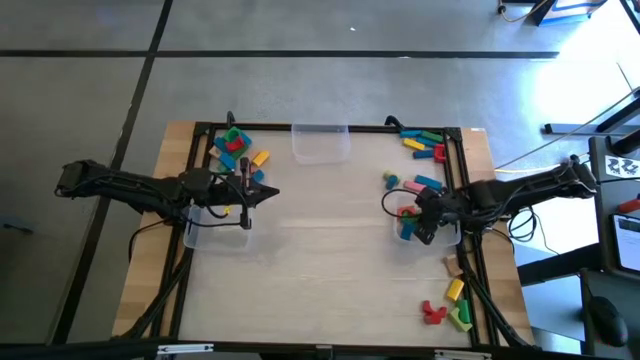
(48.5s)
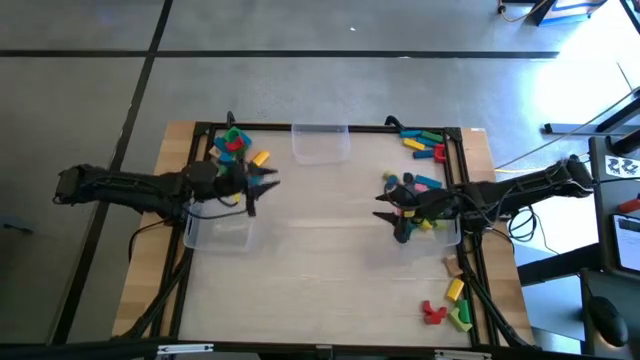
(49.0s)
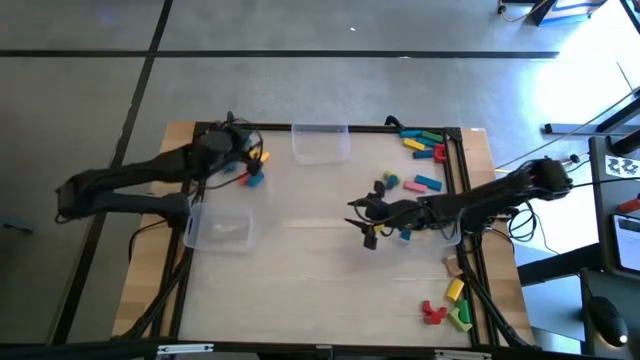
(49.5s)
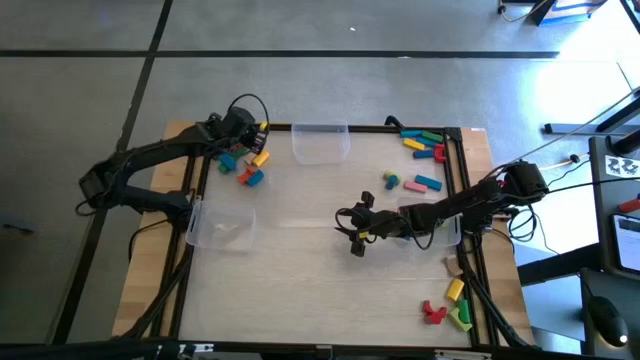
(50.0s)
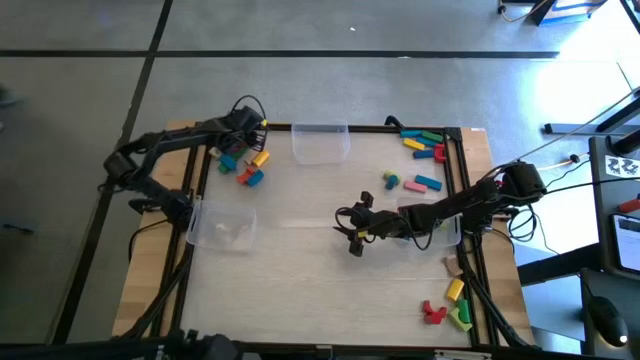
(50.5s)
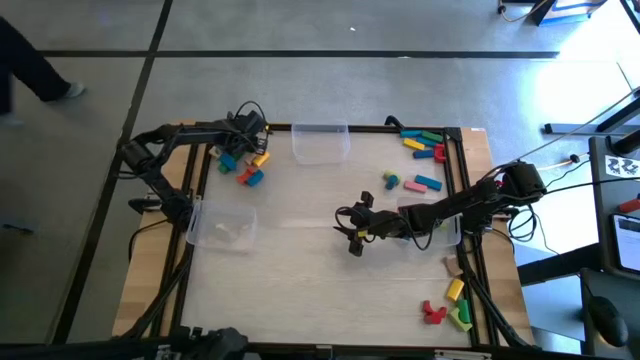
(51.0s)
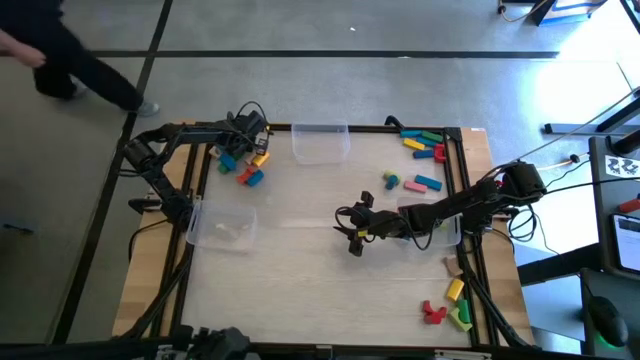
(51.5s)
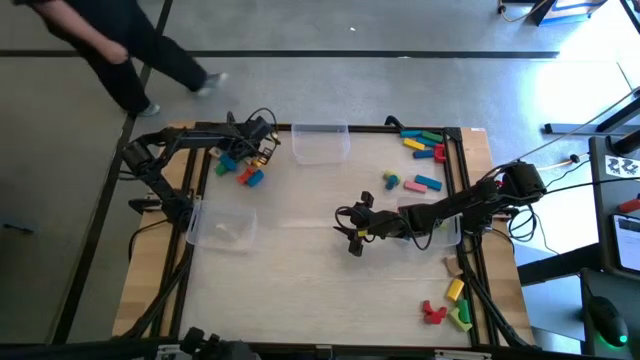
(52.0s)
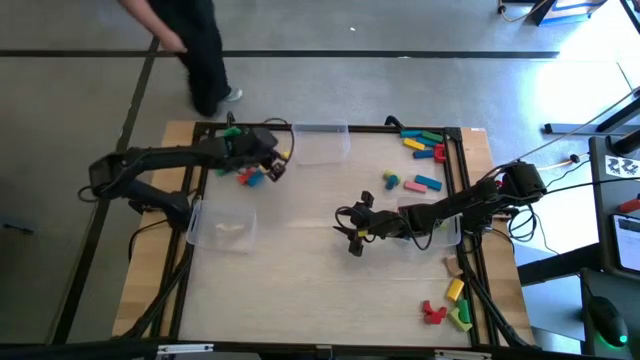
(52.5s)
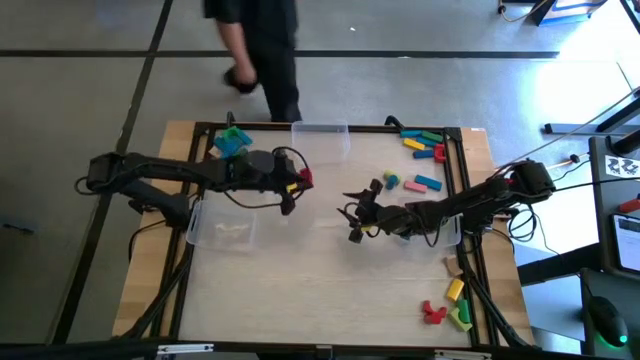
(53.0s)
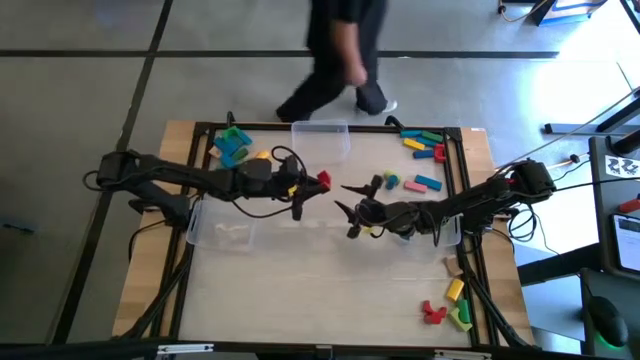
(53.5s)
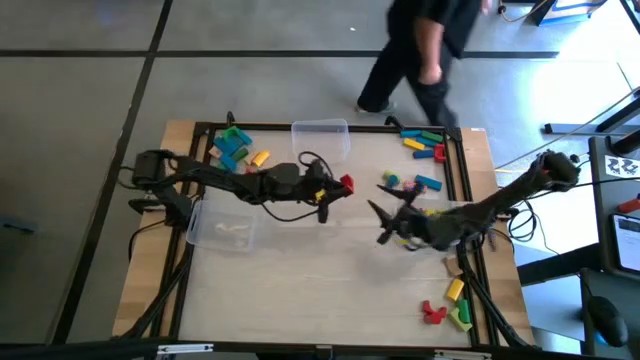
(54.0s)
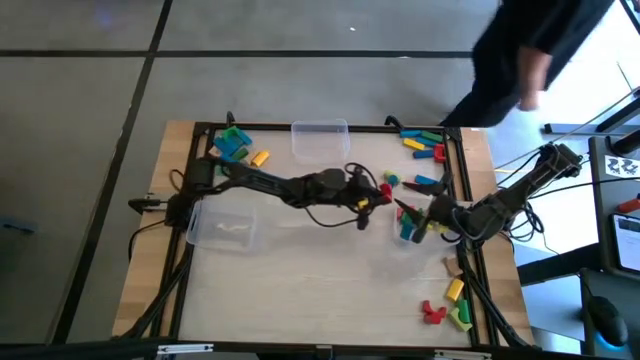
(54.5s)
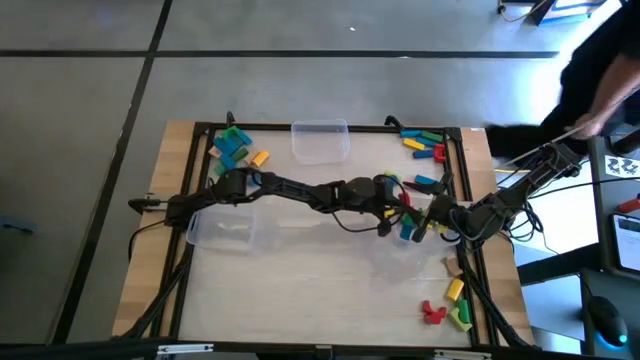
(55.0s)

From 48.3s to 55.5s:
Task: Sort blocks by size
Put the red arch block into the bottom right transparent bin

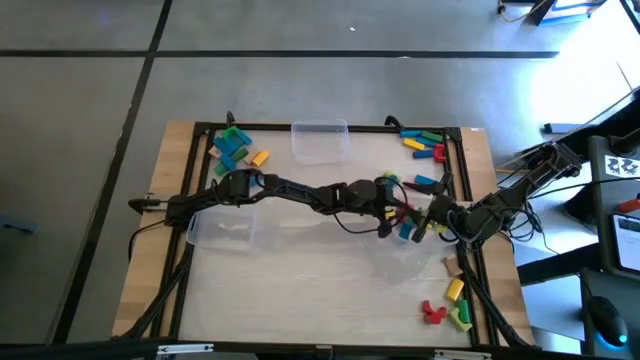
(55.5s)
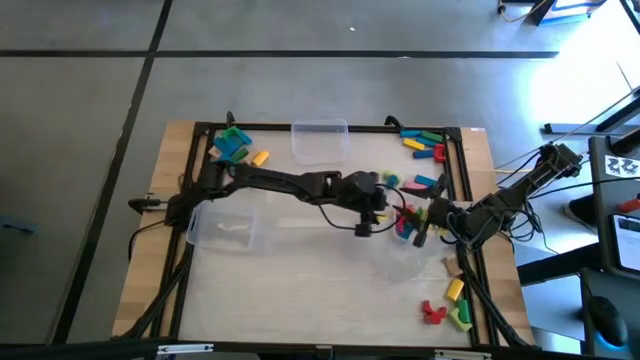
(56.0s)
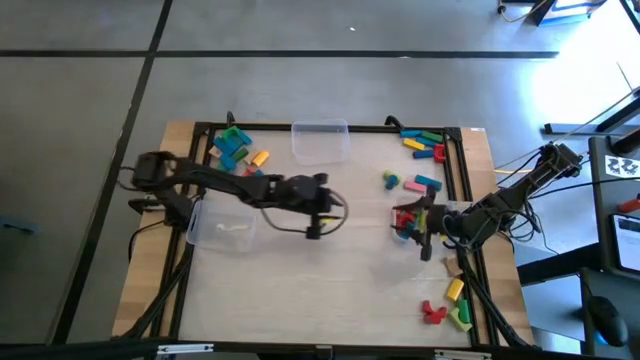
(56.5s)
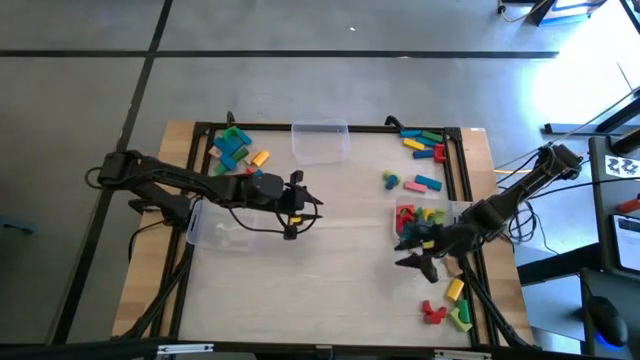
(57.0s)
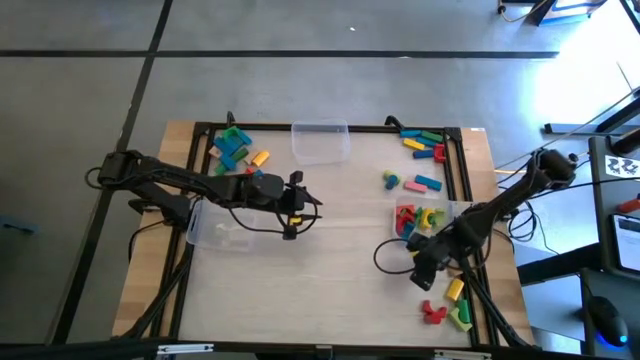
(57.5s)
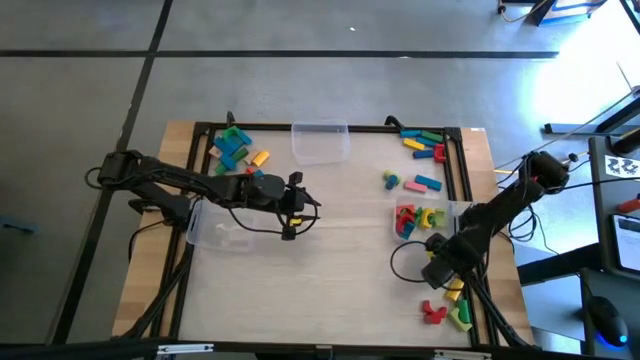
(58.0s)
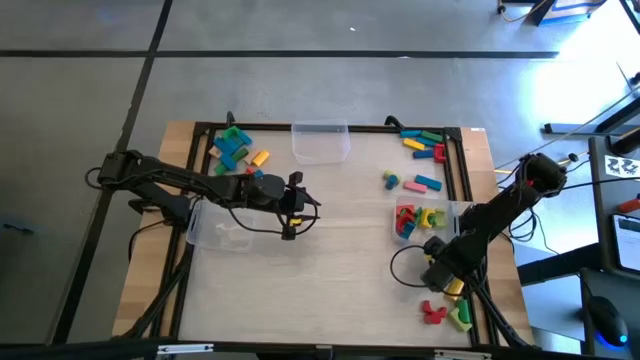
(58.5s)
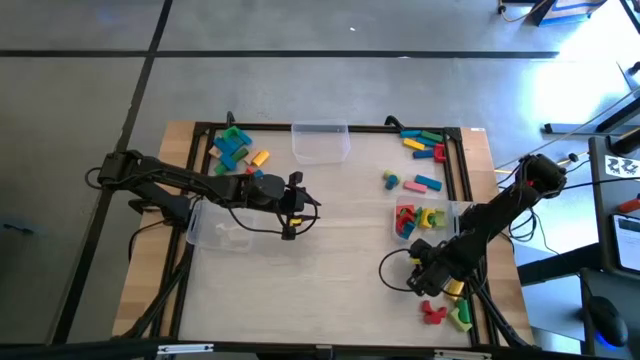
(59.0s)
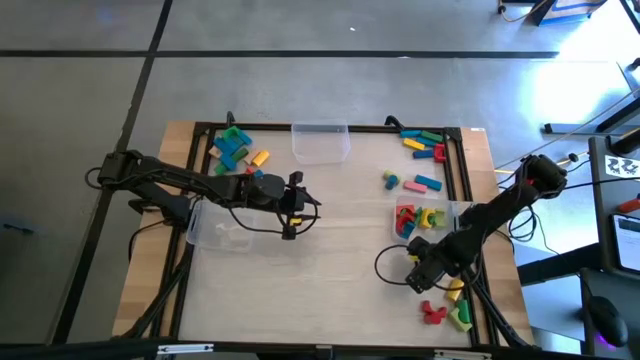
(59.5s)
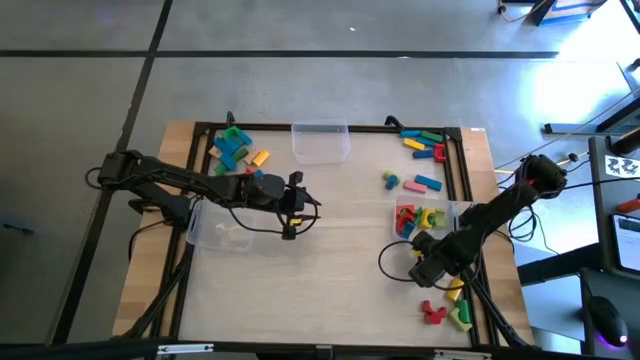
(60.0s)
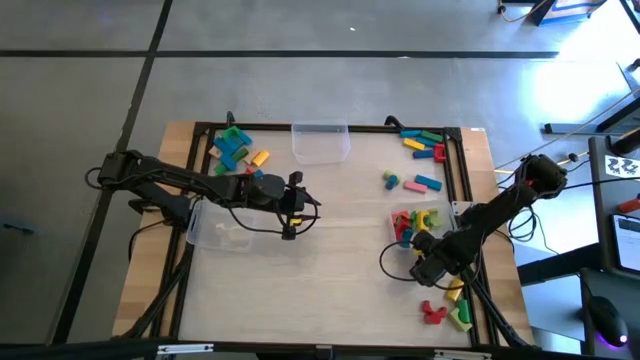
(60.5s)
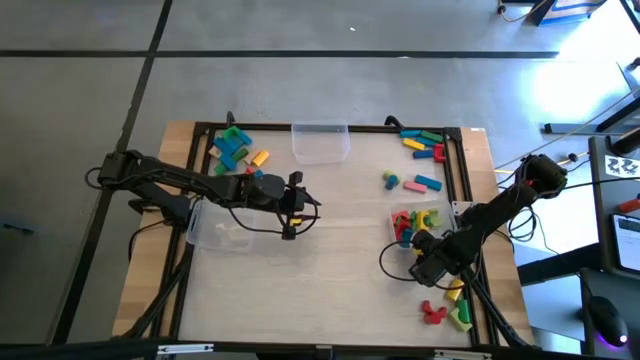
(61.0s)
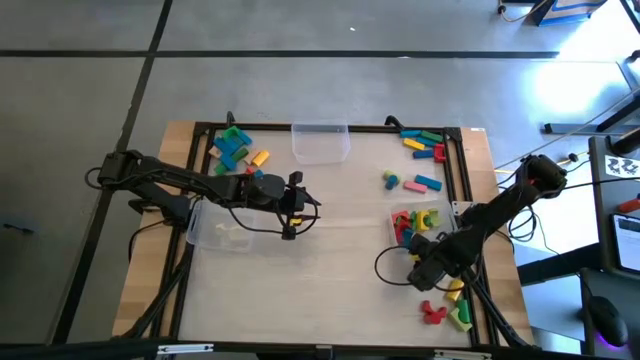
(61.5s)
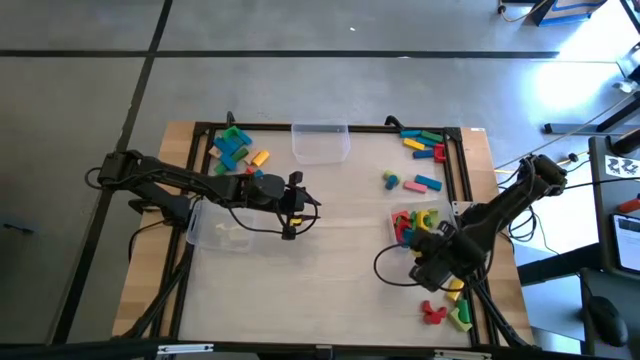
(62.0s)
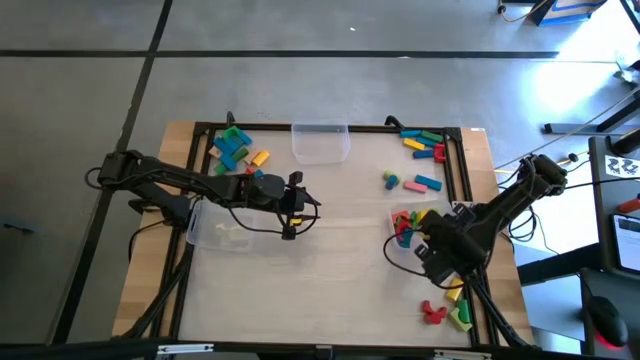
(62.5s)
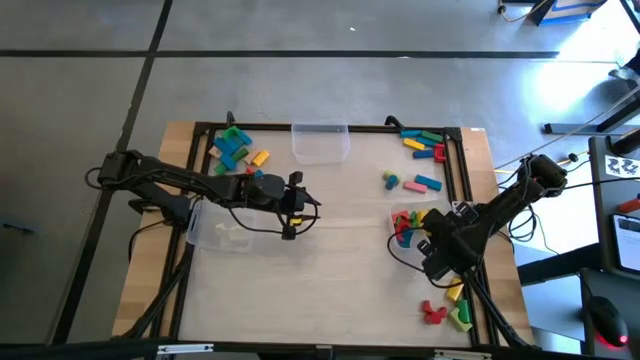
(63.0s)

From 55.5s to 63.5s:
Put the brown arch block into the bottom right transparent bin

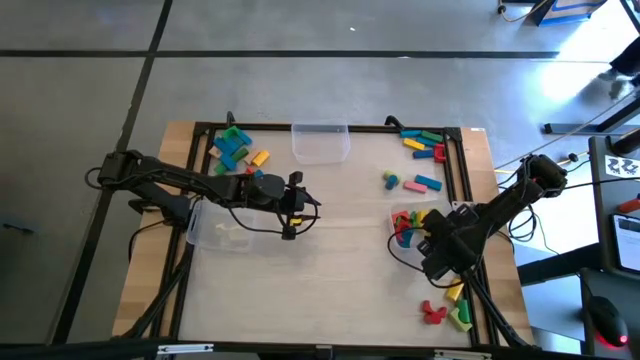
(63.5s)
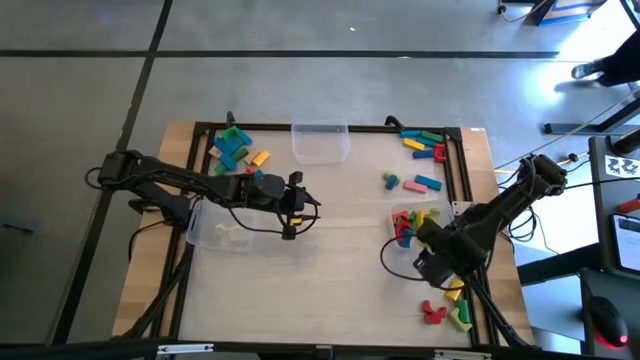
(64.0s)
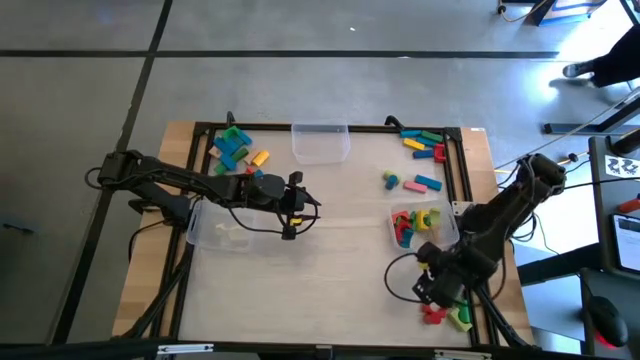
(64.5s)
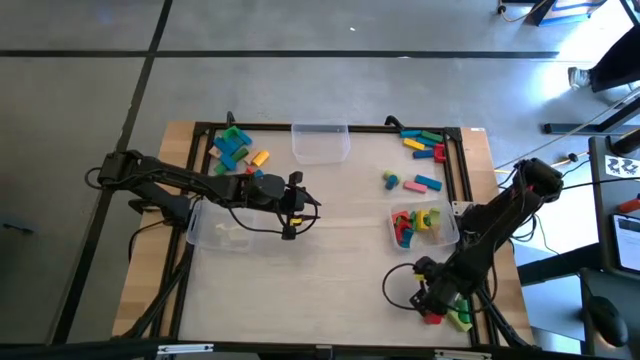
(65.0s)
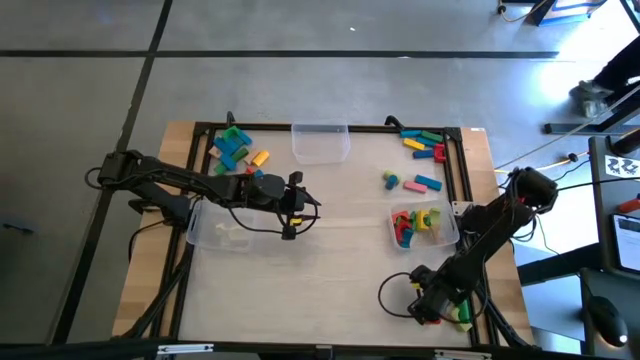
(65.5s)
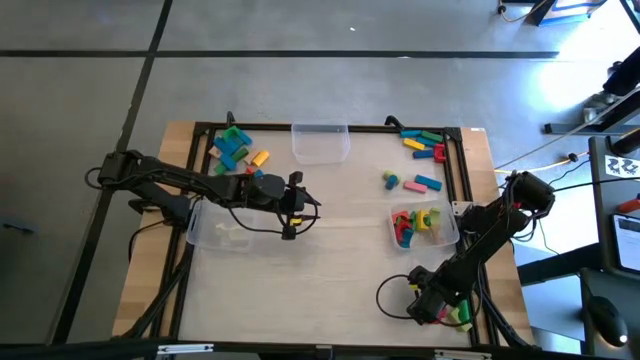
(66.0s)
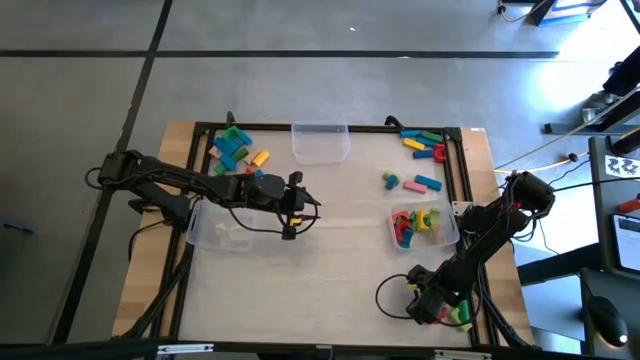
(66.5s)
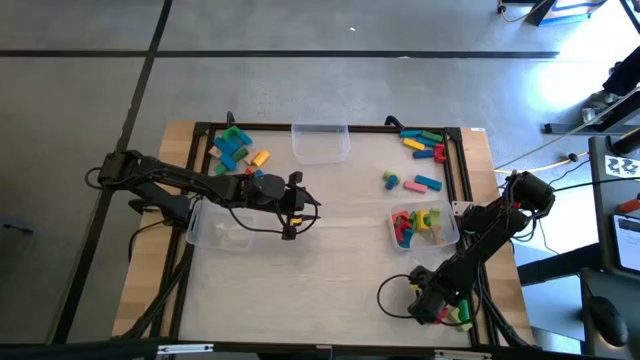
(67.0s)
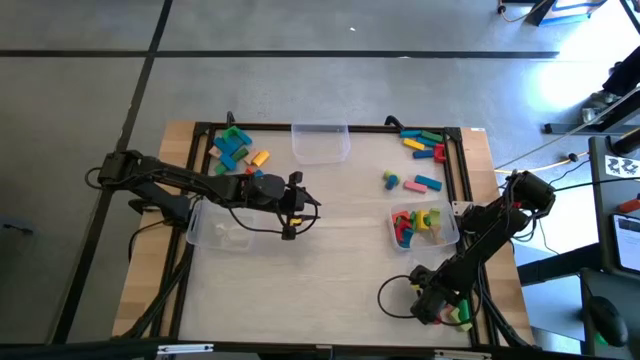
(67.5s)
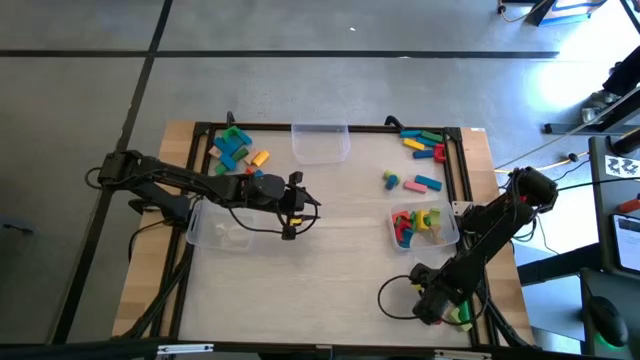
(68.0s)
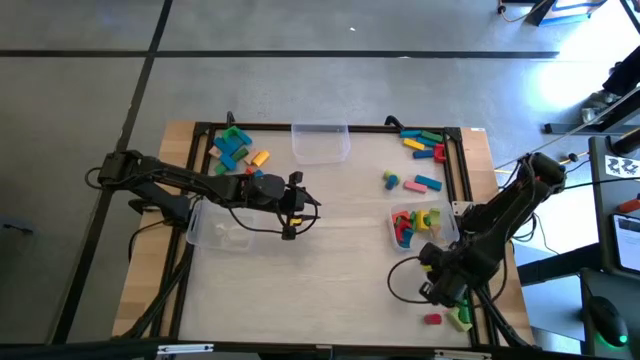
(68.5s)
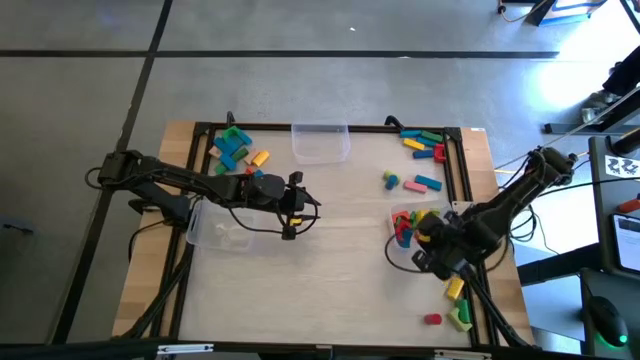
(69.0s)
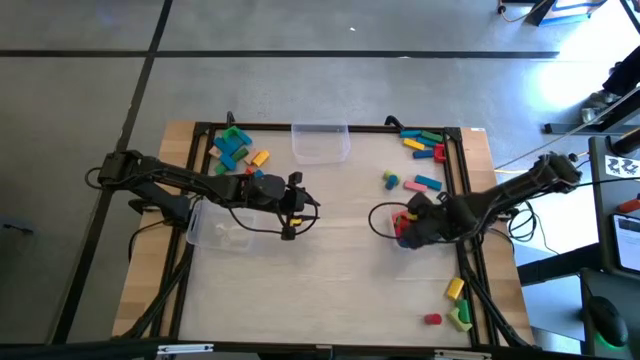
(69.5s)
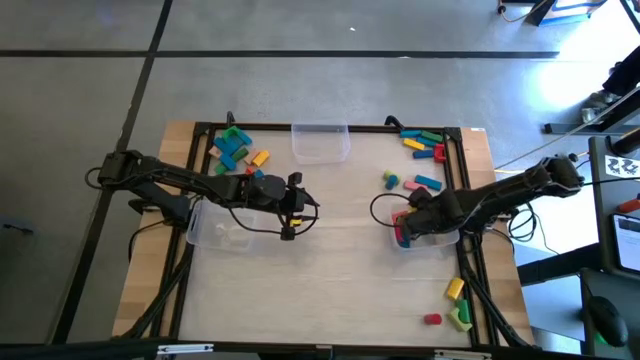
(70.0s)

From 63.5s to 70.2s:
Put the red arch block into the bottom right transparent bin

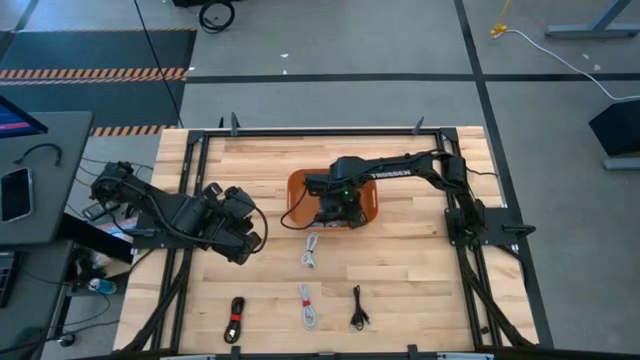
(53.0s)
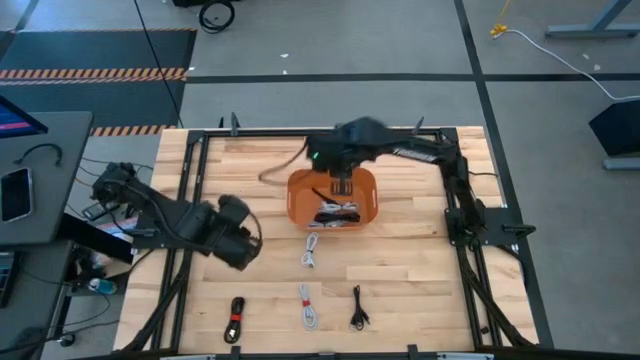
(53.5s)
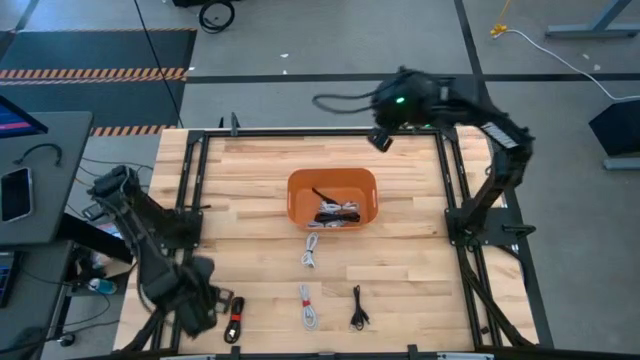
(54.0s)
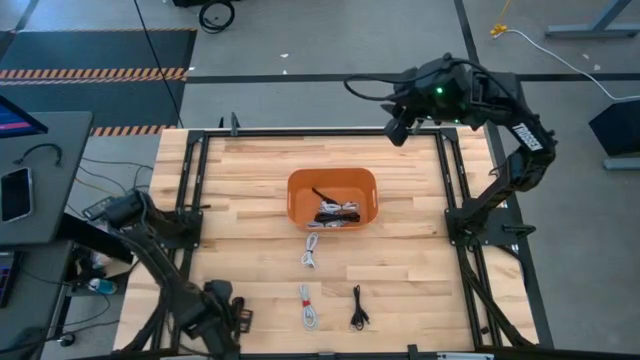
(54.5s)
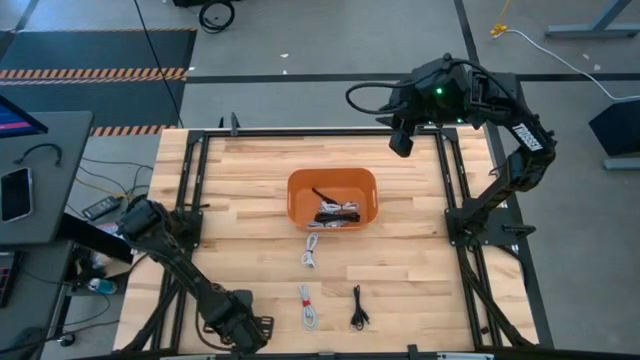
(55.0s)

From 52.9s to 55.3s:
Task: Pick and place USB-C Cables
Put the black USB cable into the orange bin
